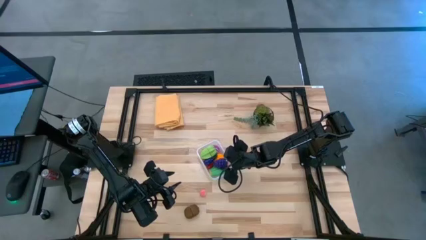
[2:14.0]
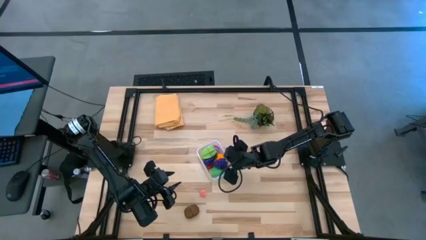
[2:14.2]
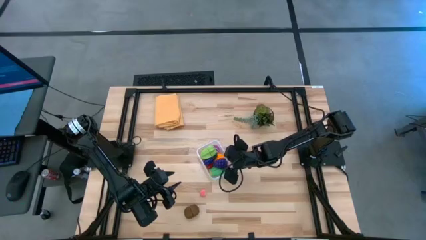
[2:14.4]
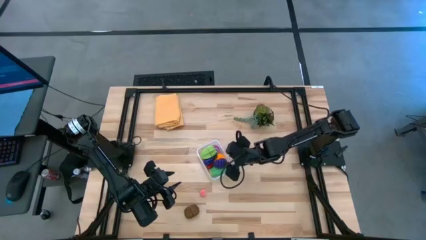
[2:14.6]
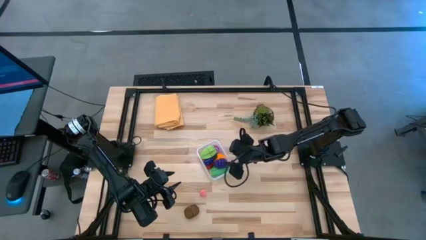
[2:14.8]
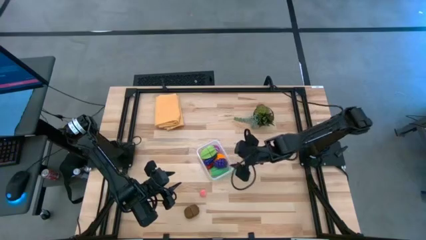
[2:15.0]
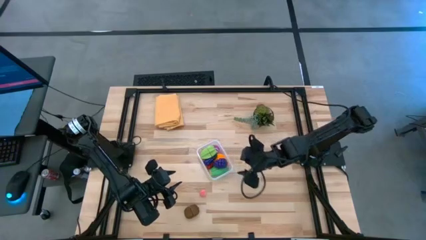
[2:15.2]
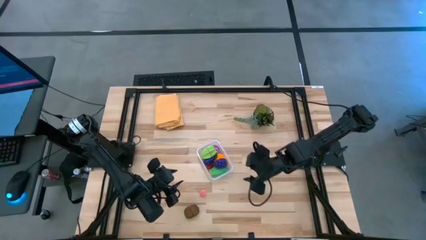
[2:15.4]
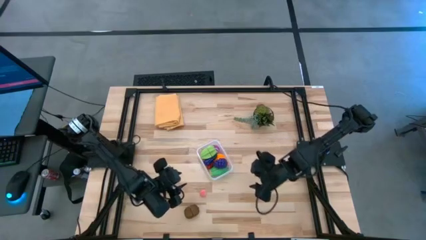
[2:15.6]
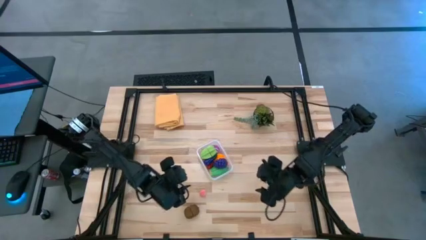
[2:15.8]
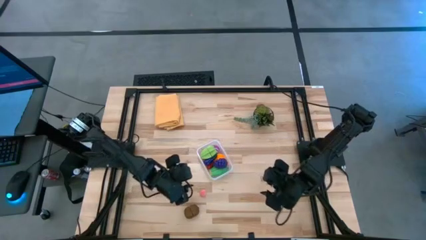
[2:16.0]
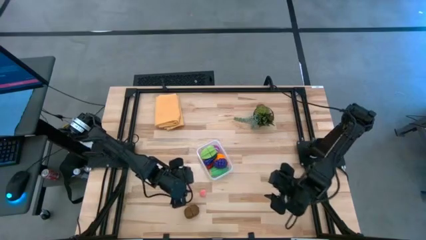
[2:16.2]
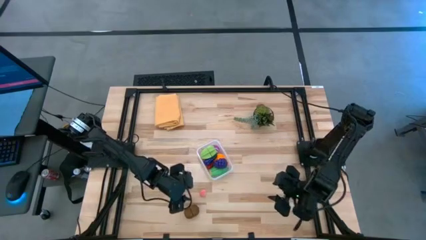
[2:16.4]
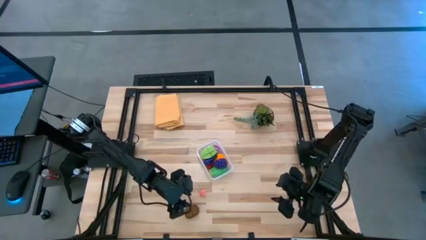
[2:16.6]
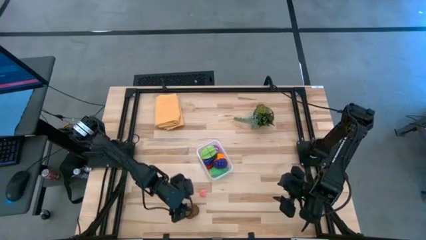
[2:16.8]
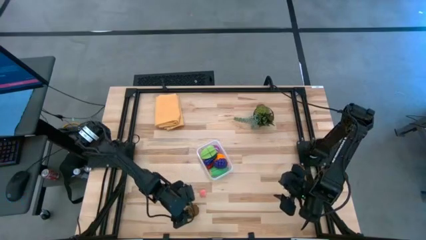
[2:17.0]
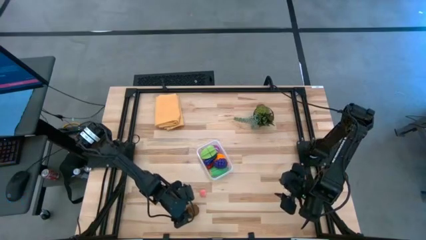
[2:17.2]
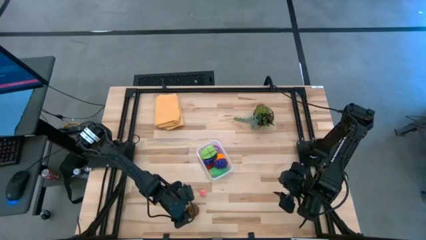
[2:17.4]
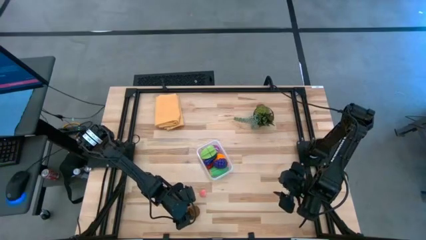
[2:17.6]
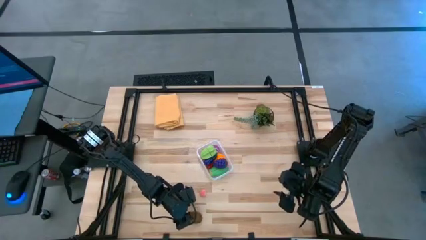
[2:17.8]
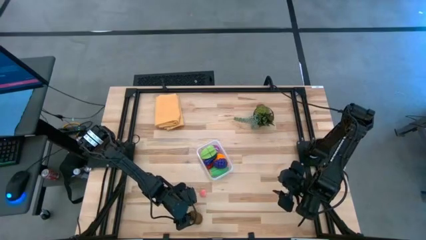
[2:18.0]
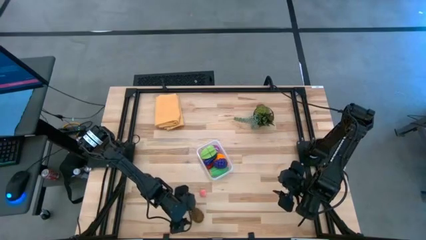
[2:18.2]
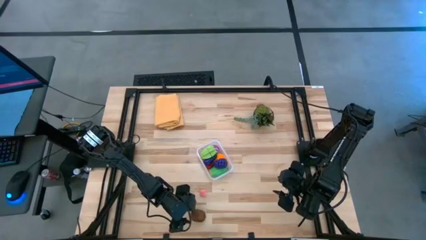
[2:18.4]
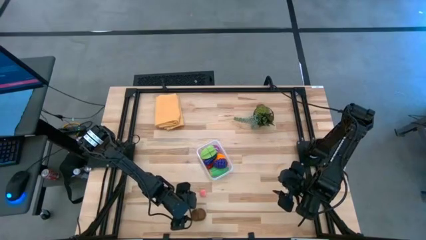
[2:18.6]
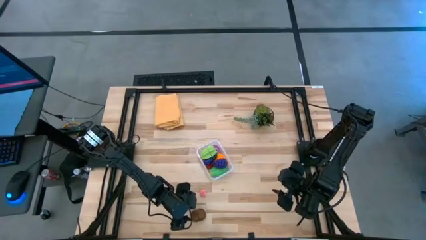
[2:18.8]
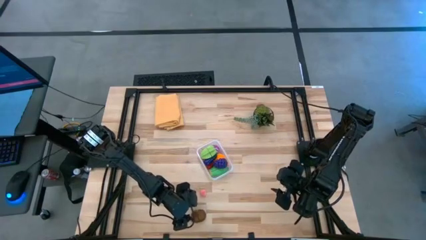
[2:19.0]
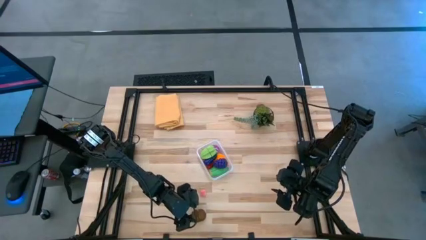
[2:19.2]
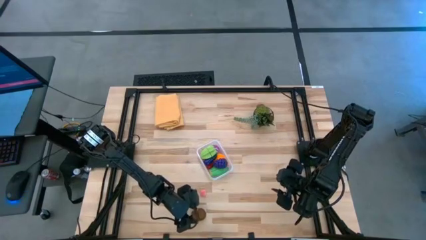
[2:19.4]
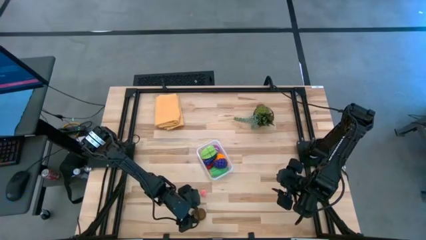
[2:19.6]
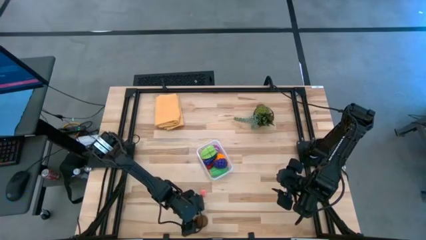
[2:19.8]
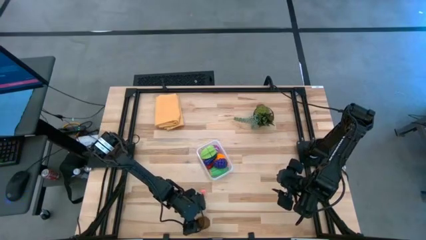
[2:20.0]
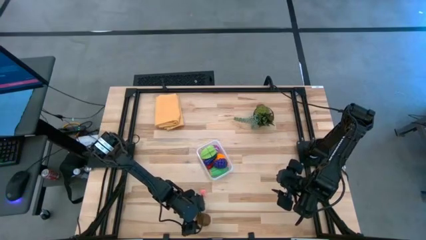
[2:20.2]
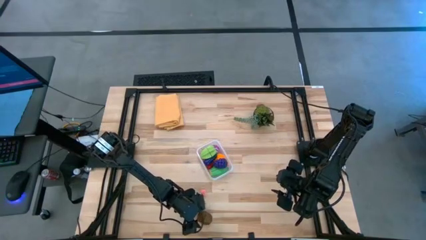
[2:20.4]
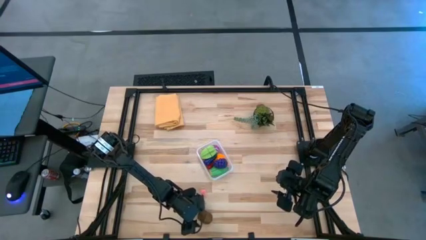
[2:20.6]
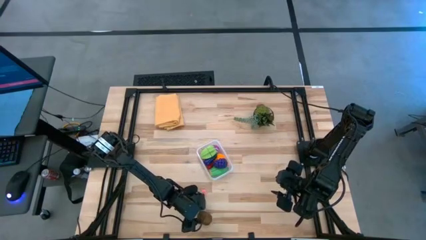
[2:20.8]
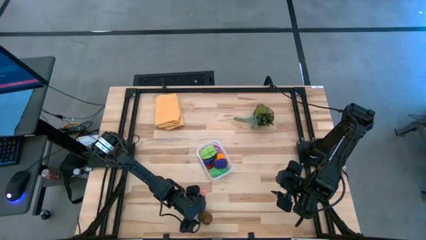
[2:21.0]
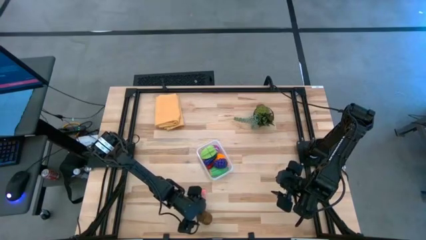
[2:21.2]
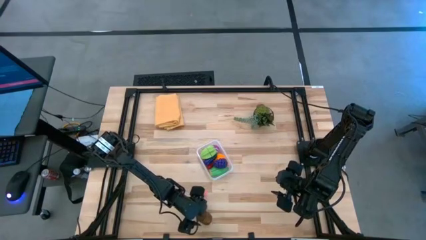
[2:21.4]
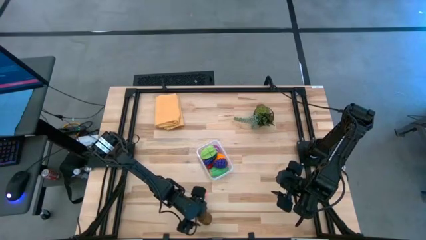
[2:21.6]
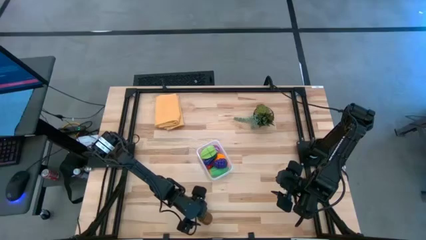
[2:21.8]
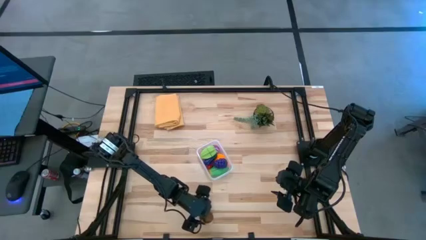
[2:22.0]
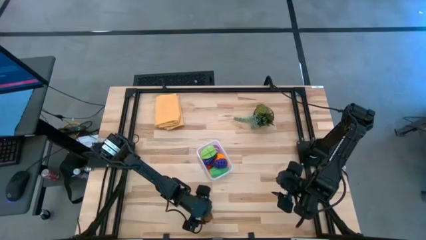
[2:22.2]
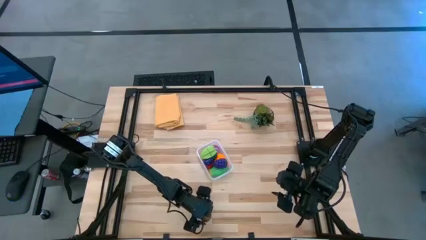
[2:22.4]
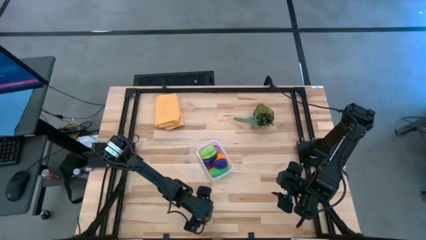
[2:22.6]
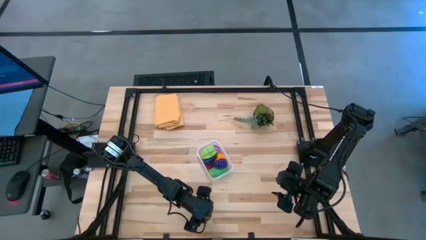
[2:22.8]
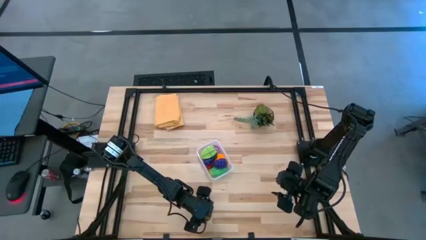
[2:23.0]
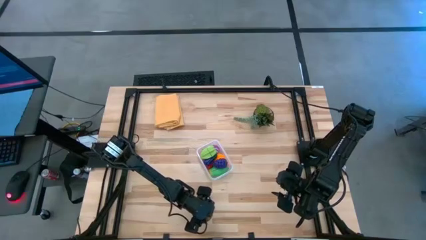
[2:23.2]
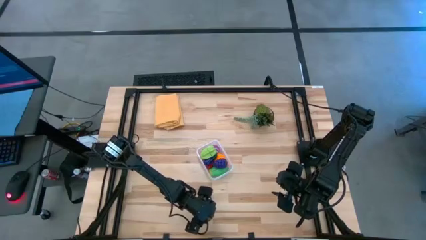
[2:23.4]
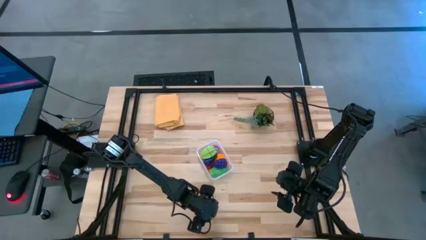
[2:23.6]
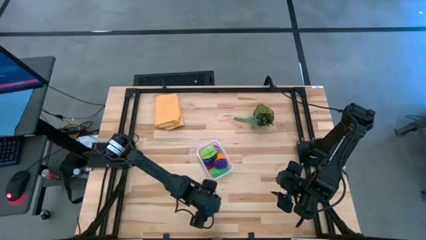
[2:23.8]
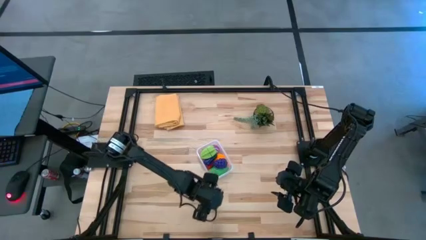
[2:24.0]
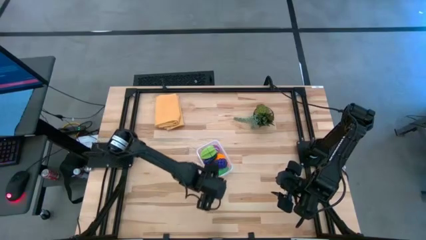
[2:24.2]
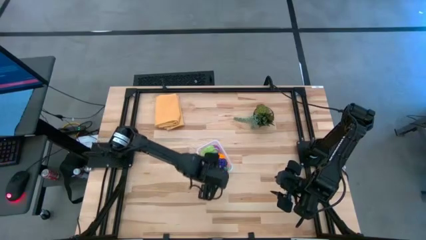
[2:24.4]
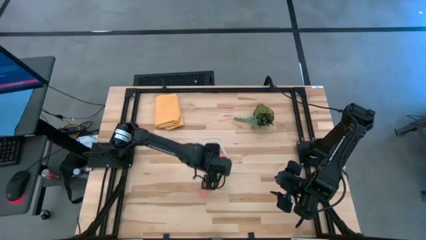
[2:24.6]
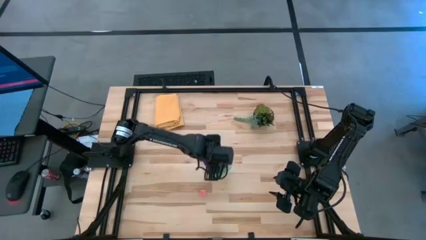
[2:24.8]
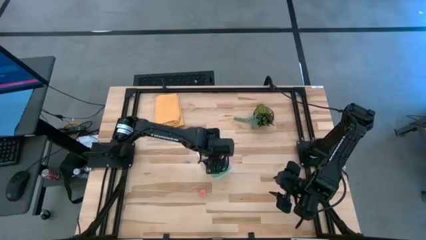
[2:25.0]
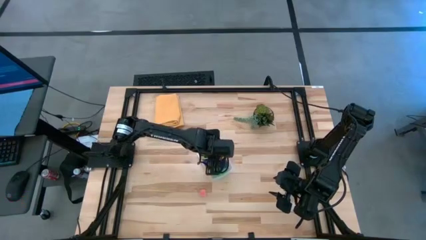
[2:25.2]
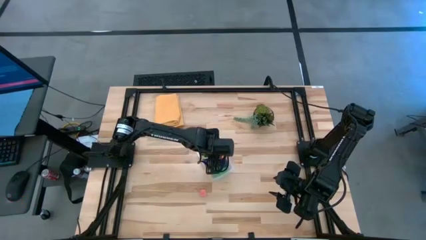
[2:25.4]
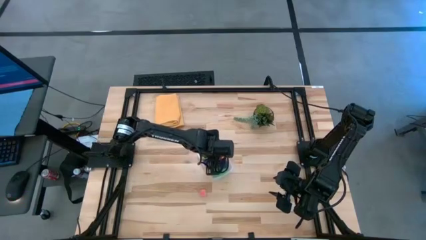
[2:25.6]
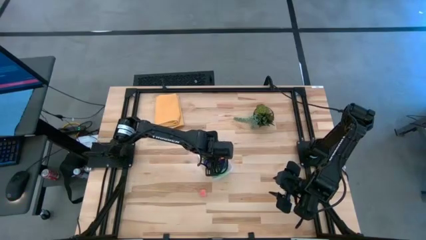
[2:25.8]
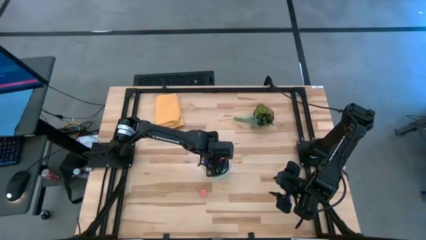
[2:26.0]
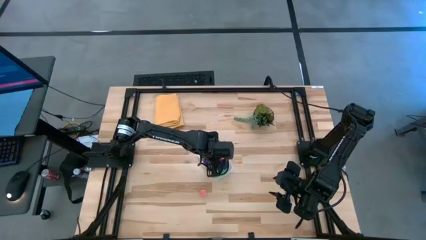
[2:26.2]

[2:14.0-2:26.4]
Task: Pick and placing Produce into tupperware
Put the brown kiwi into the transparent bin
